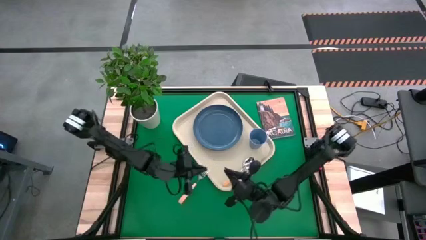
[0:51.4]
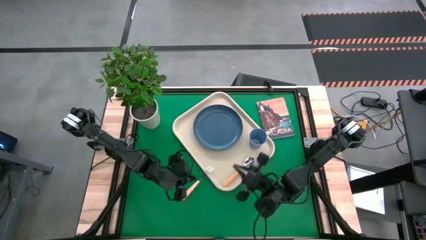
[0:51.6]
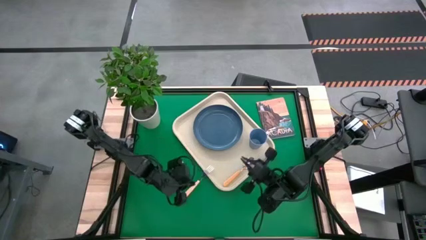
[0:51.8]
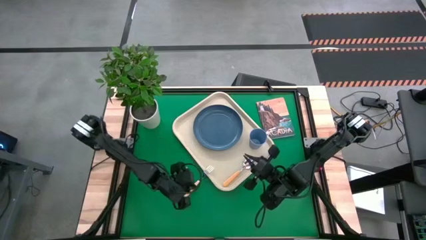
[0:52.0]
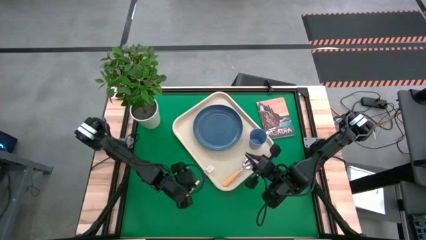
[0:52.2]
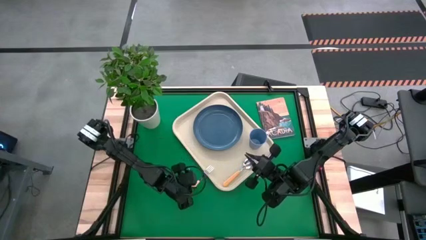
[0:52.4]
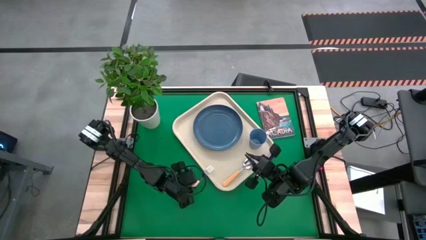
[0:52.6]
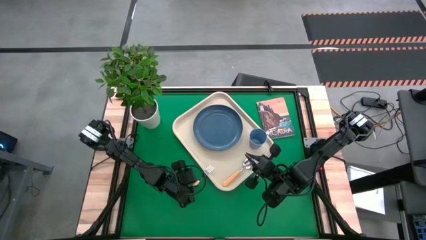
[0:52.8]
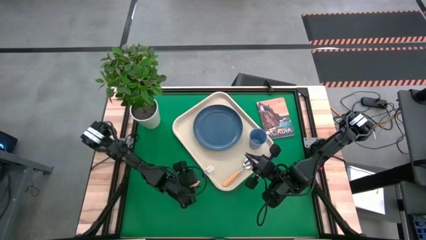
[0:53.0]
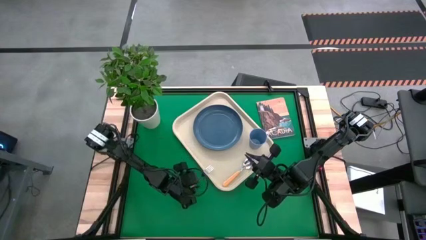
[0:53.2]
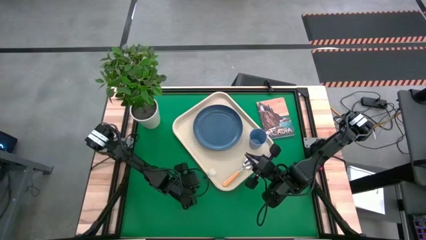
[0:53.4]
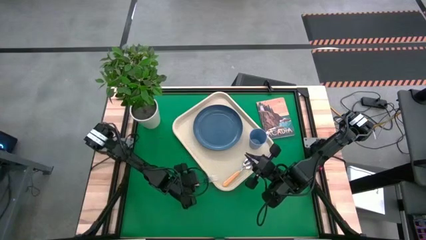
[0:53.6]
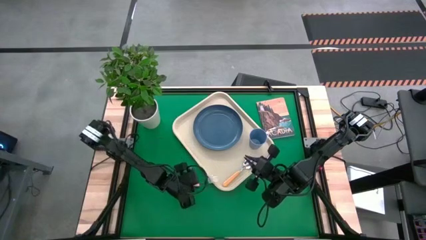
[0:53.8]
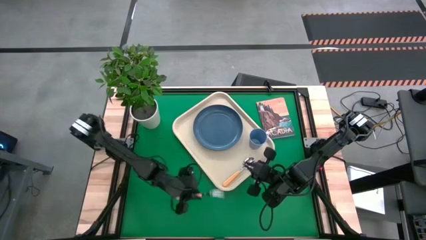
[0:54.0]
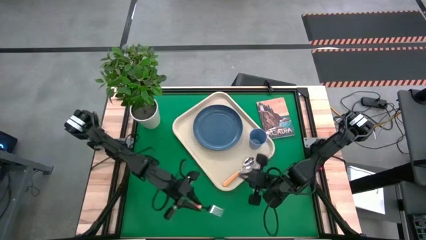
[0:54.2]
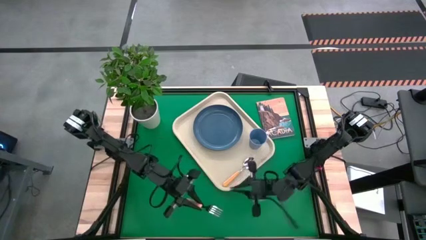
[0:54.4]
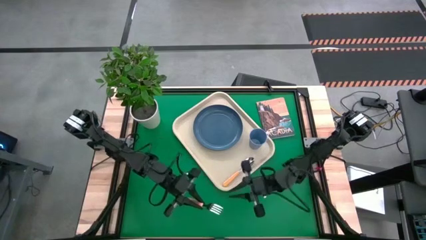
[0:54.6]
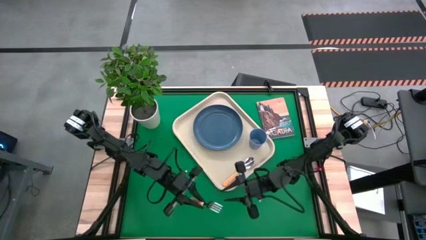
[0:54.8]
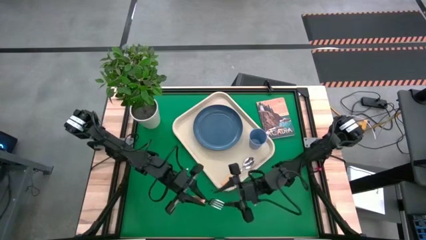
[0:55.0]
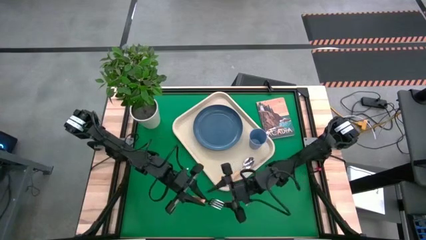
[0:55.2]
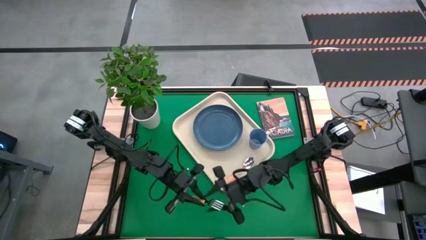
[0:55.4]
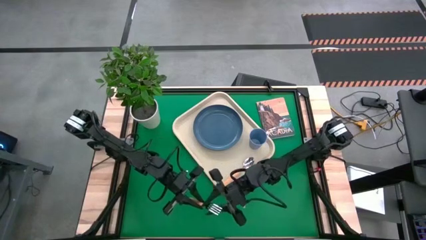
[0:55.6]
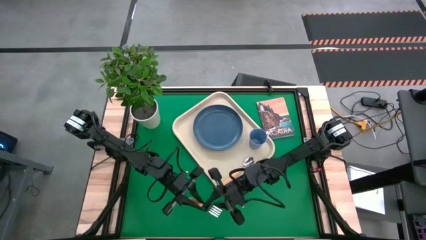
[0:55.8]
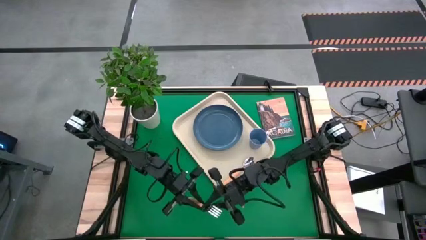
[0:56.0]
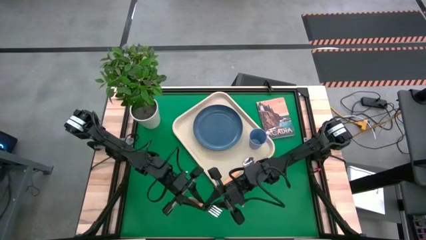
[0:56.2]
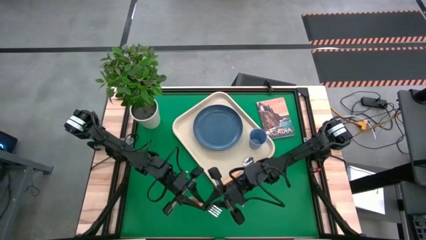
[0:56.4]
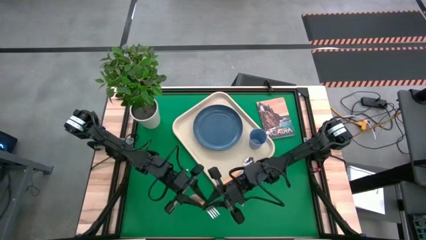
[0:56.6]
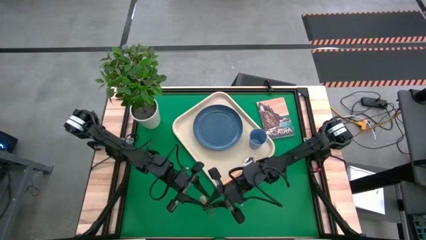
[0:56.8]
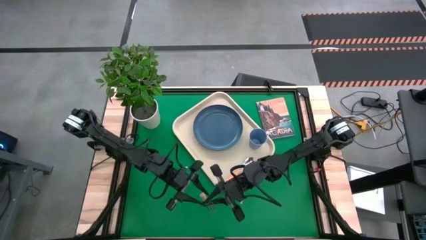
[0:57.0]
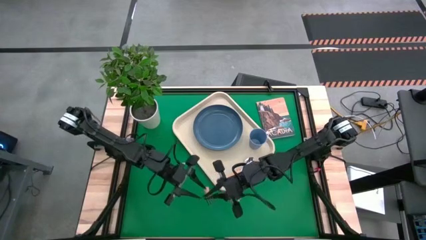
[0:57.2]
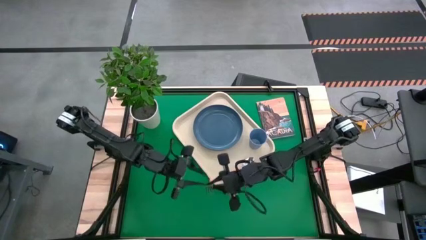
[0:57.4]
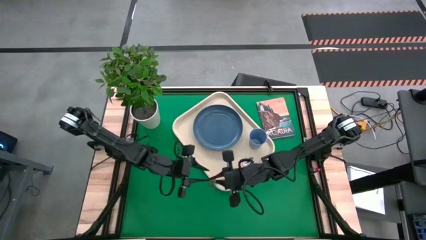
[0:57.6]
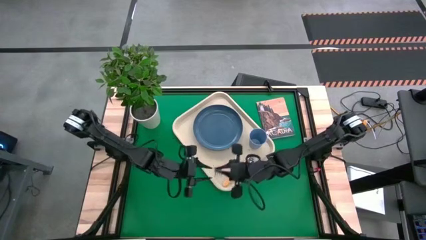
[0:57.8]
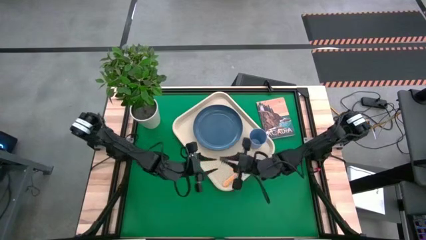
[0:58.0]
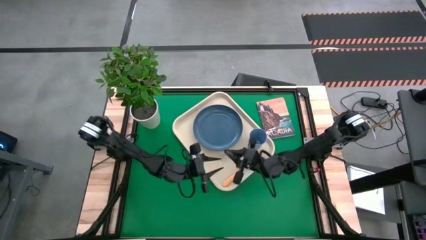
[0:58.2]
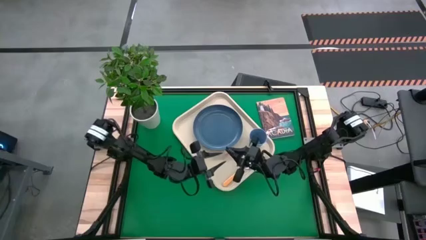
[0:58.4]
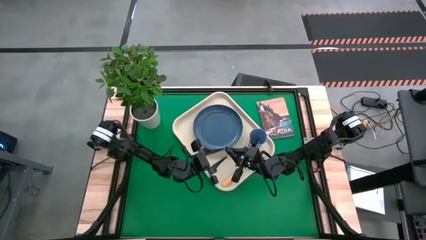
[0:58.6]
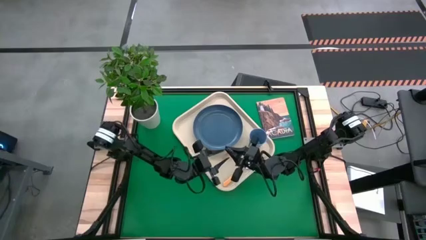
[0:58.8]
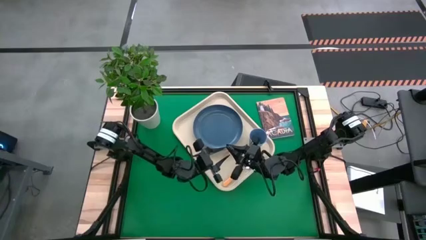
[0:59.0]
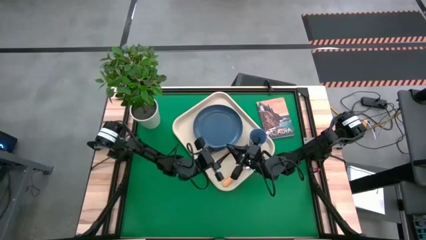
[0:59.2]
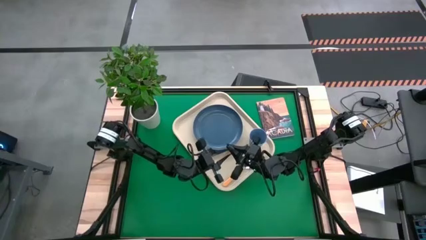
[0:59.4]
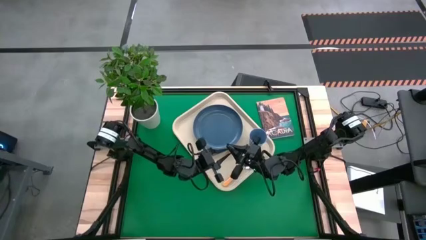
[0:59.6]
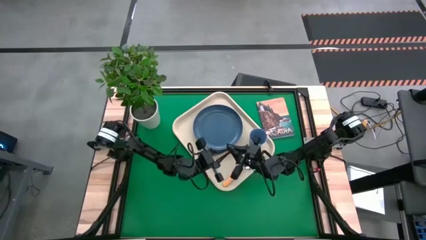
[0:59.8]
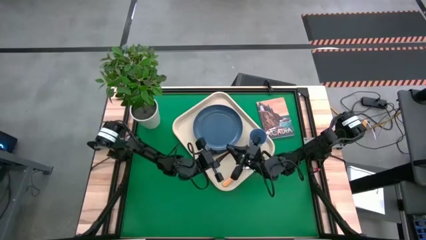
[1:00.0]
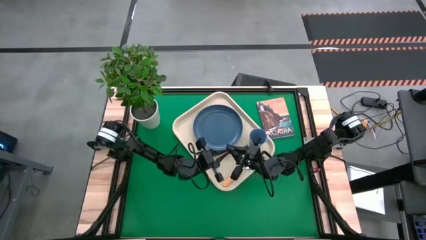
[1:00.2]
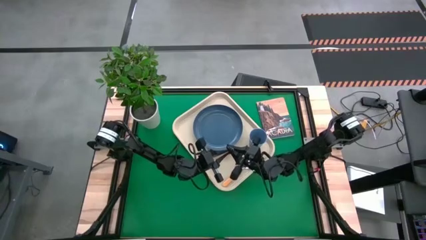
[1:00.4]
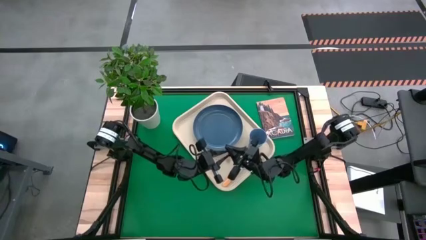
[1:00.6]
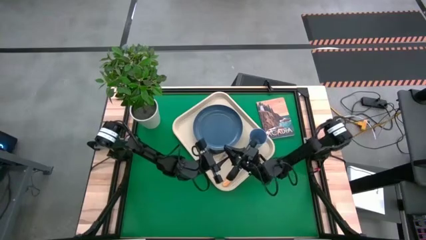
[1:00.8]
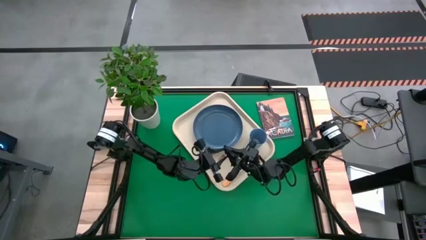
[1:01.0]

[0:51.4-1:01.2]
Task: Pick and place plate/cup/fork/spoon on tray
Put the fork on the white serving tray to the left side of the blue plate

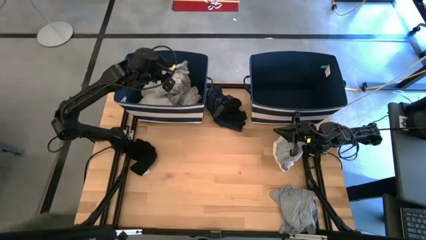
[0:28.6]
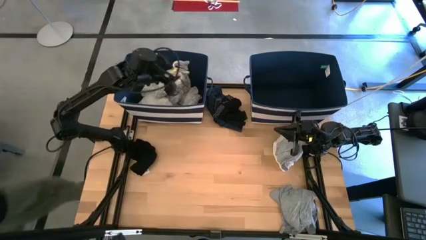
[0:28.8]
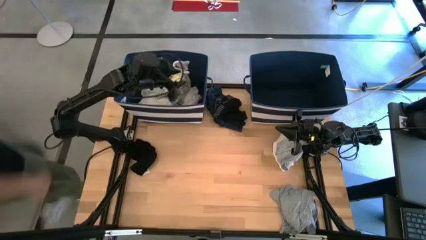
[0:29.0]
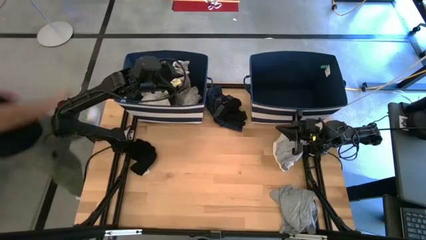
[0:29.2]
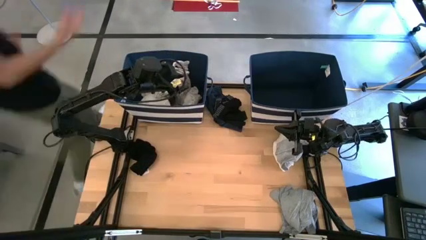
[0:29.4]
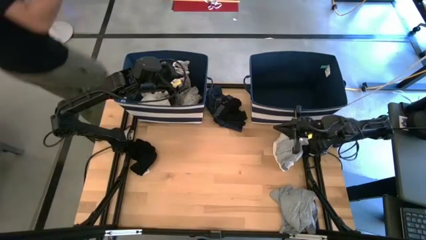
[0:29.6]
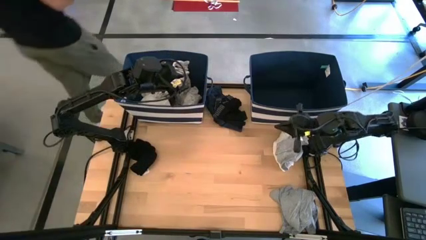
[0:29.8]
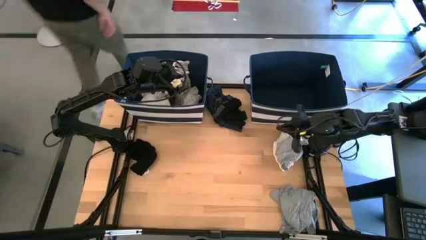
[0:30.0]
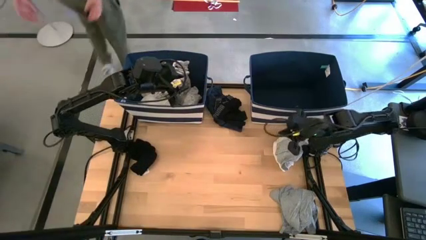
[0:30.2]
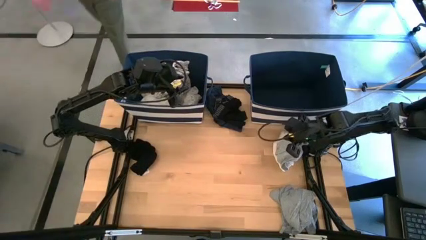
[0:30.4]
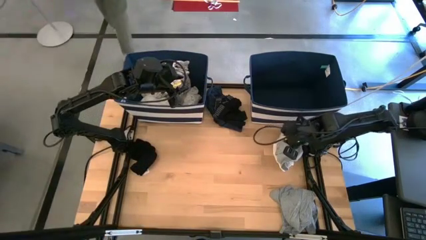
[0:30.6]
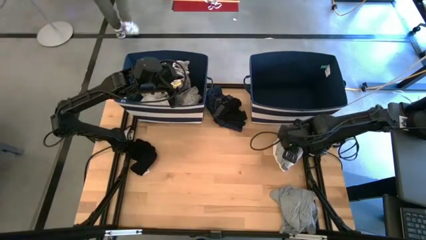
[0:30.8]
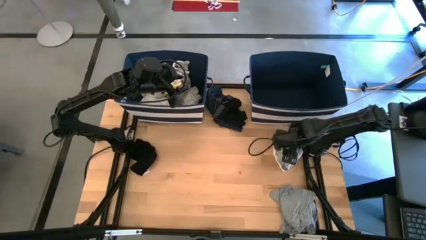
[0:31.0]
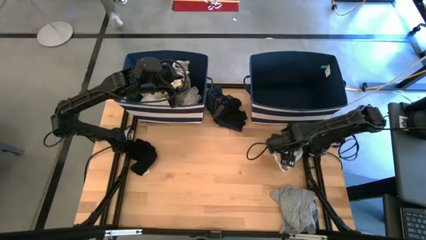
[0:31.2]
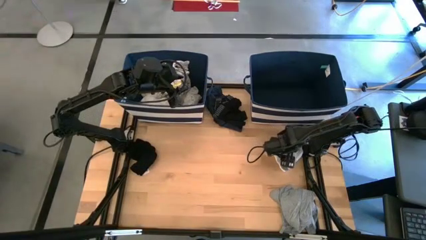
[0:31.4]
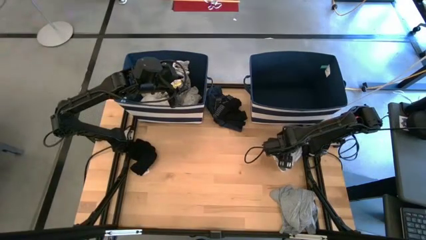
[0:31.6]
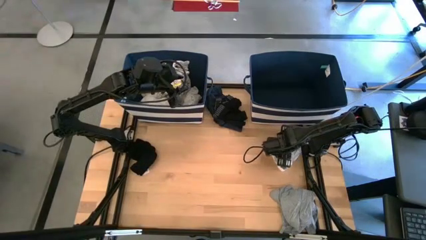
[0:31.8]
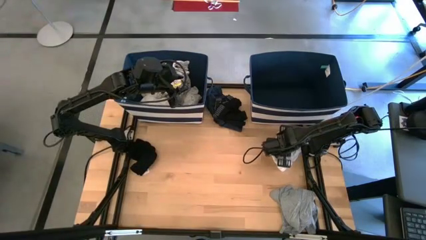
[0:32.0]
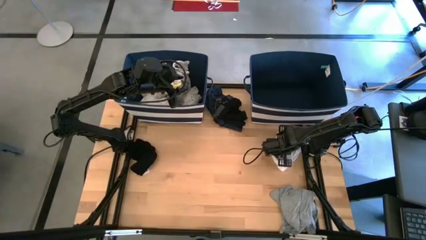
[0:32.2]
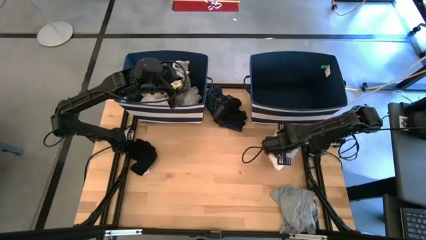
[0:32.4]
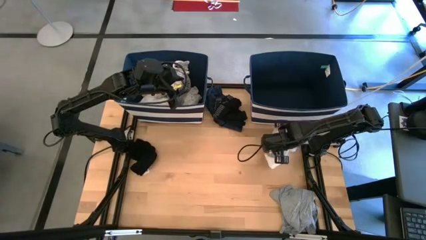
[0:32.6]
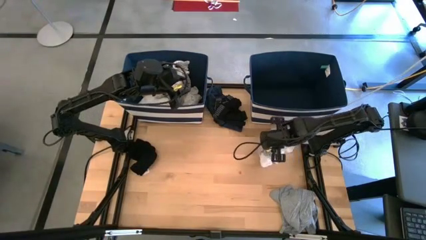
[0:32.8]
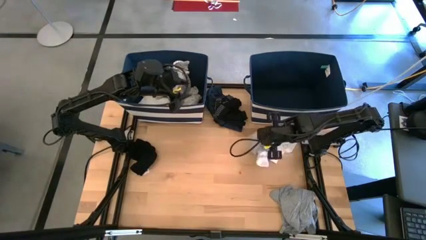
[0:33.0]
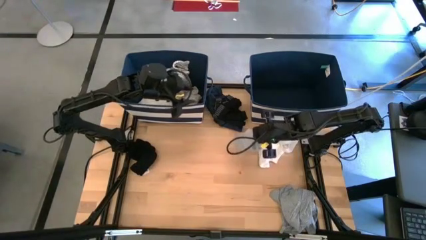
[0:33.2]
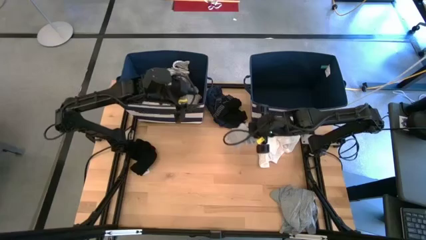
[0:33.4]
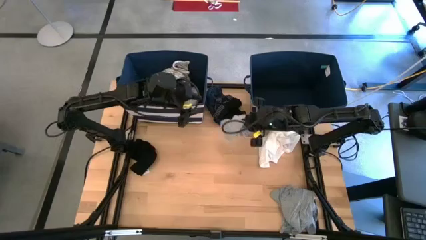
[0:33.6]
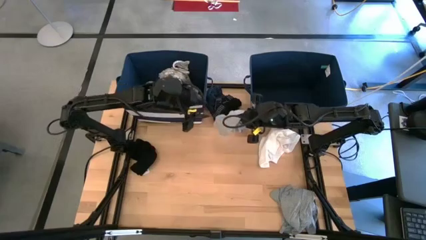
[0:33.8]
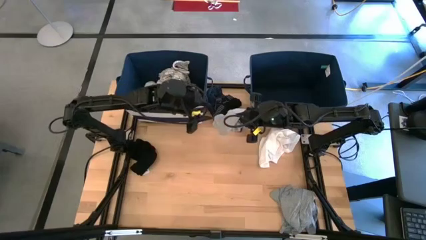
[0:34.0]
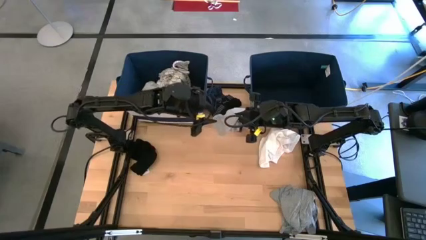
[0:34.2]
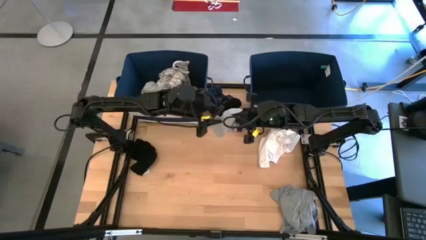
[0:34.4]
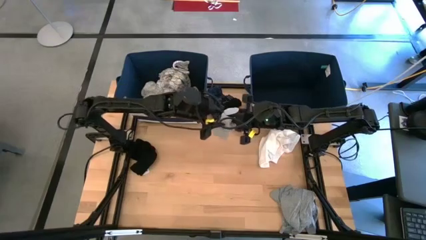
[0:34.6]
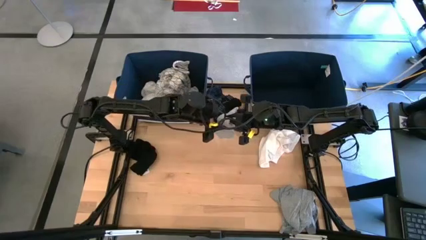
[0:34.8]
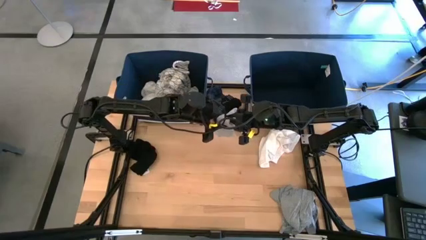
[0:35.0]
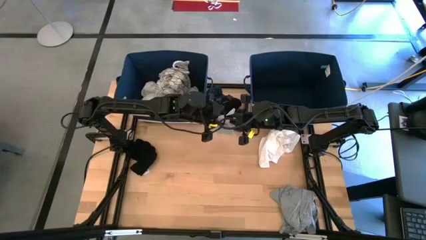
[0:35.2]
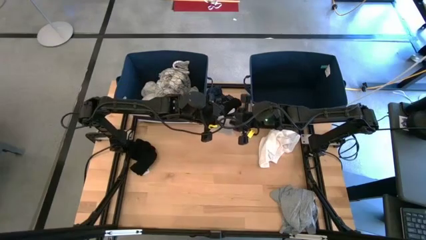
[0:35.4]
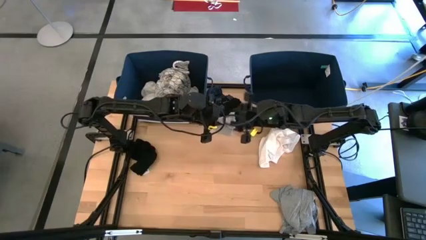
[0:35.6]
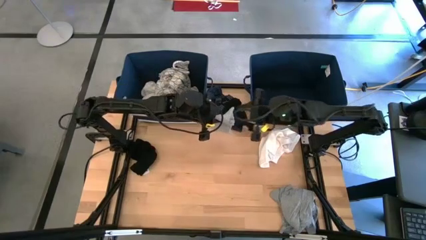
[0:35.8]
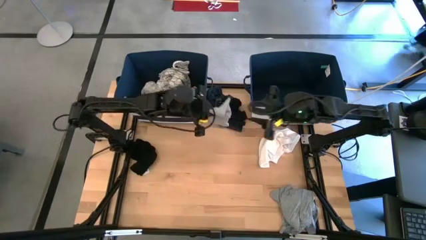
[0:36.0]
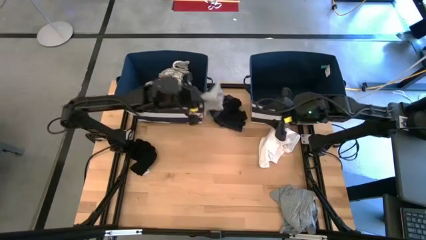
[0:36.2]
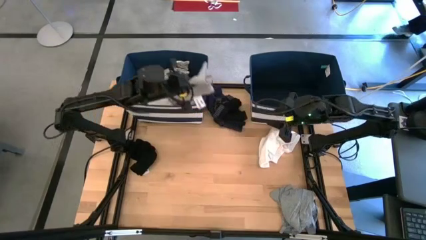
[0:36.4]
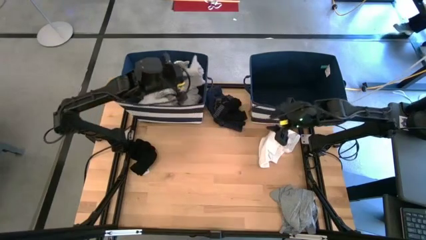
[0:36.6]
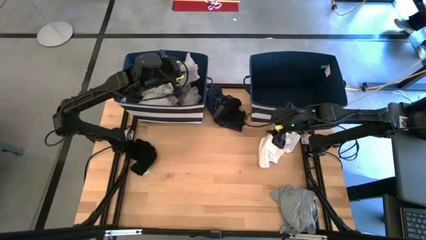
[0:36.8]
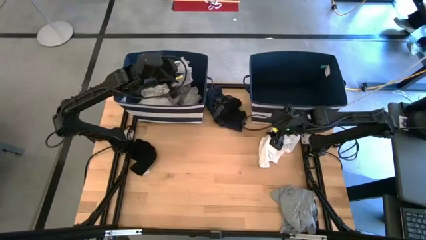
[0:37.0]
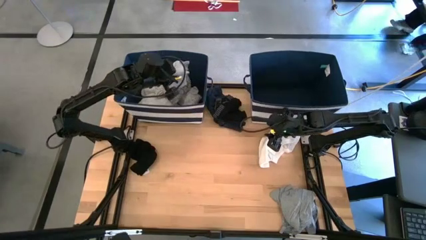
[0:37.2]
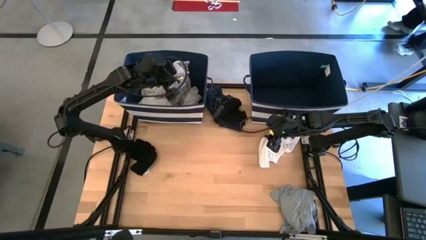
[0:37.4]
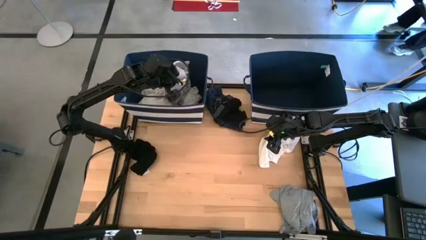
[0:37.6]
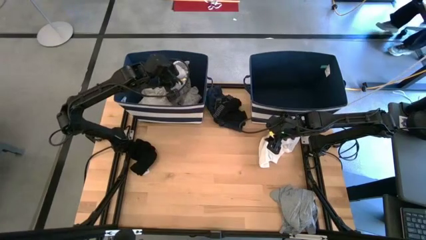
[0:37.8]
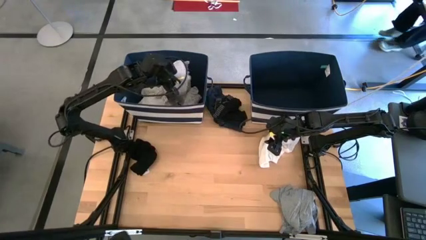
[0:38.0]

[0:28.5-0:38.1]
Task: Sort clothes
Put the gray shorts into the left blue bin
